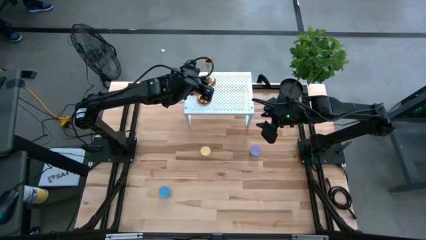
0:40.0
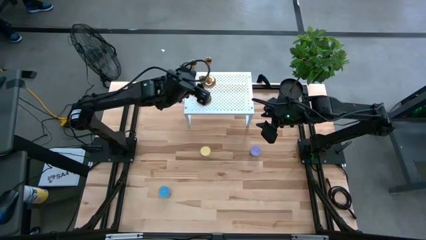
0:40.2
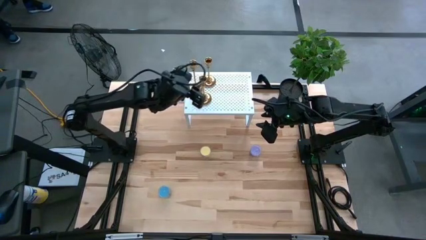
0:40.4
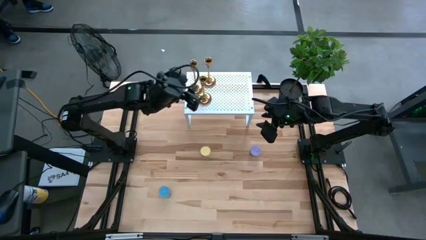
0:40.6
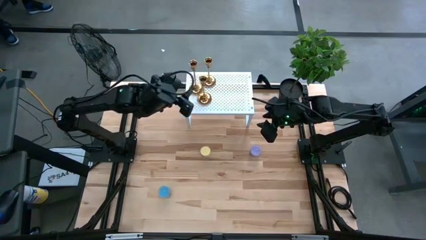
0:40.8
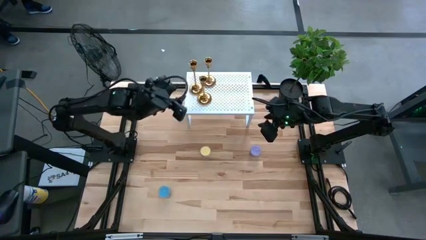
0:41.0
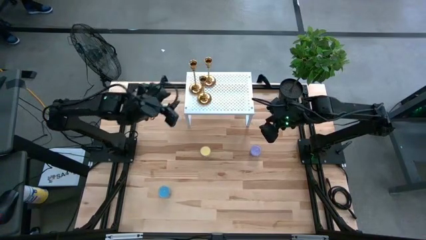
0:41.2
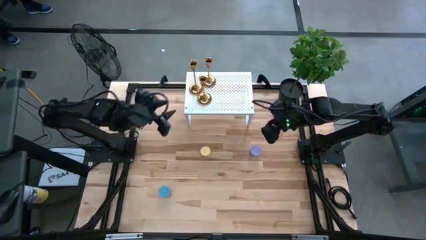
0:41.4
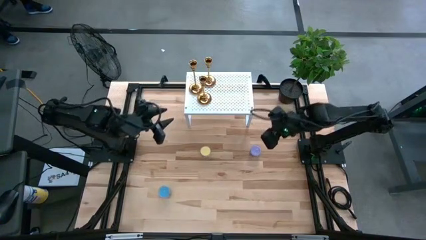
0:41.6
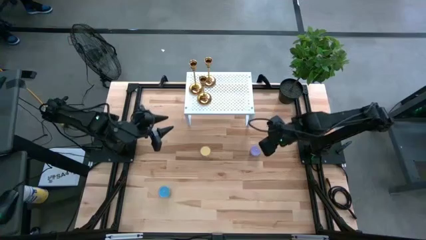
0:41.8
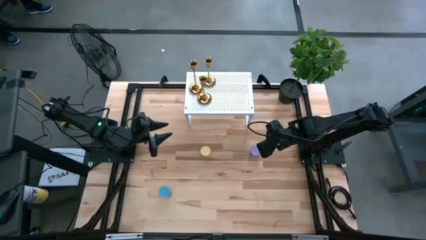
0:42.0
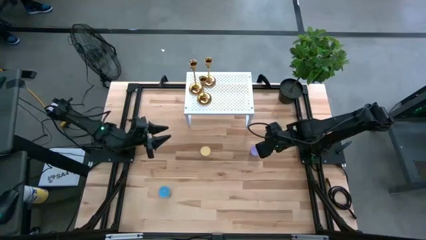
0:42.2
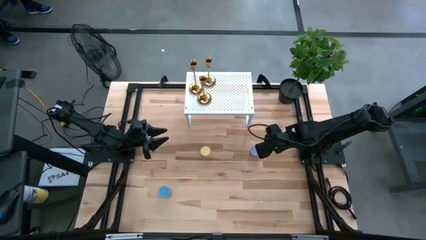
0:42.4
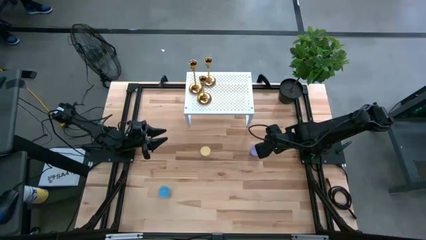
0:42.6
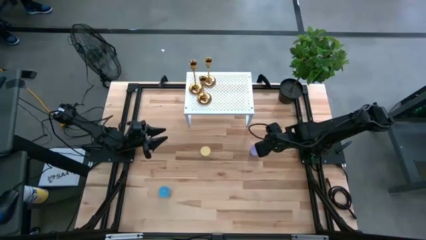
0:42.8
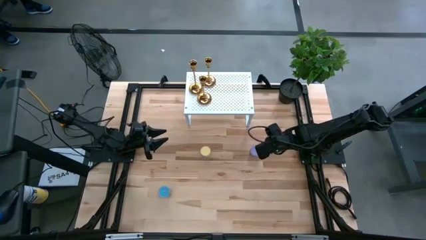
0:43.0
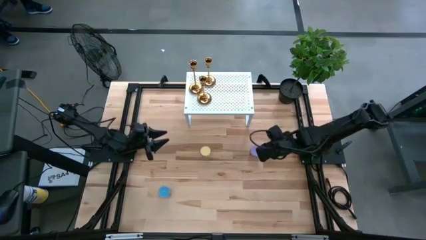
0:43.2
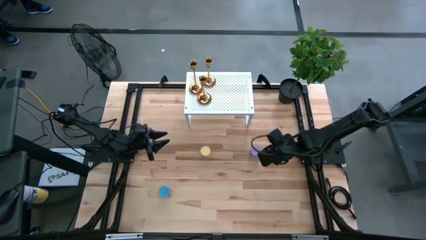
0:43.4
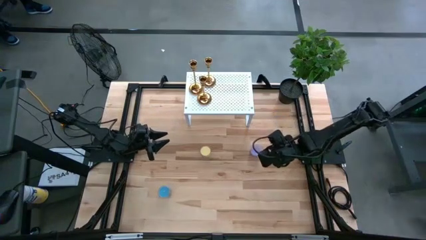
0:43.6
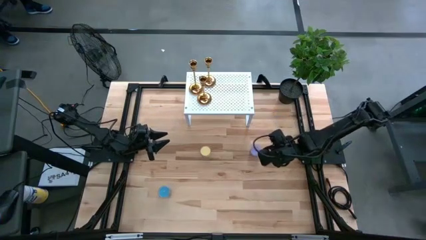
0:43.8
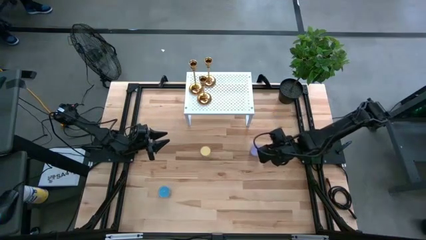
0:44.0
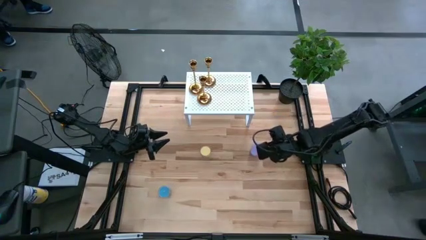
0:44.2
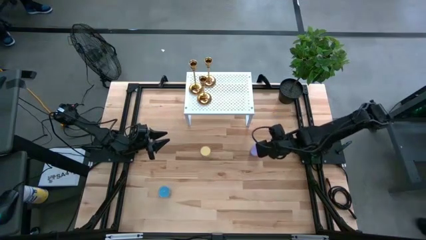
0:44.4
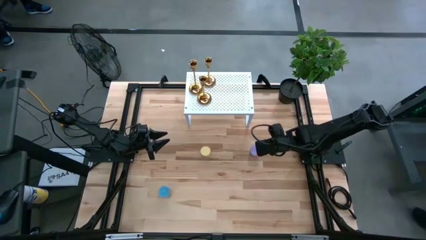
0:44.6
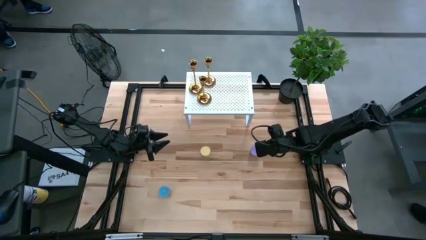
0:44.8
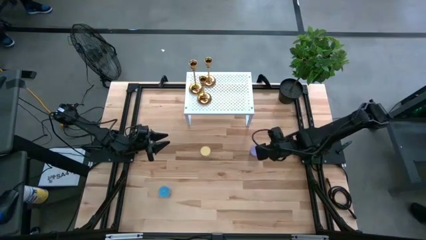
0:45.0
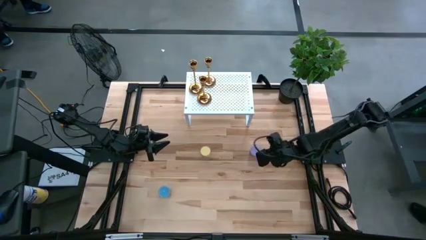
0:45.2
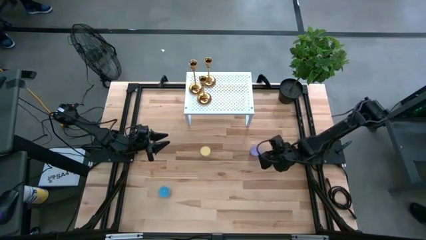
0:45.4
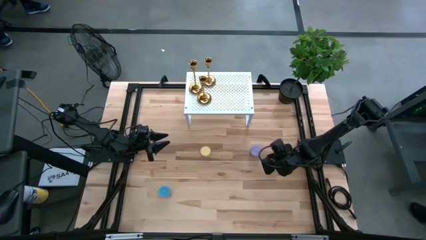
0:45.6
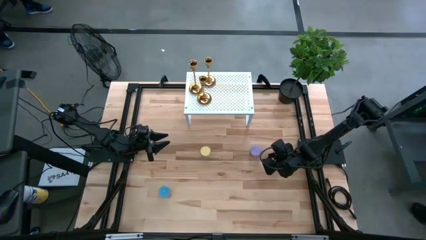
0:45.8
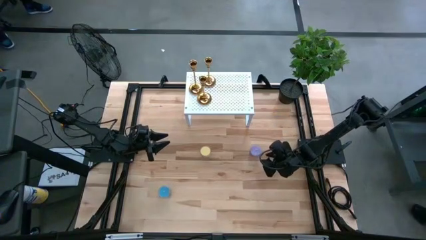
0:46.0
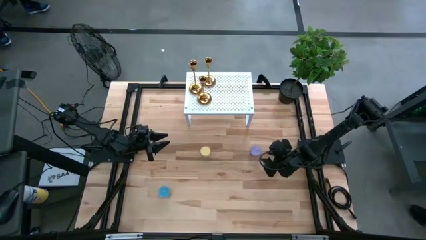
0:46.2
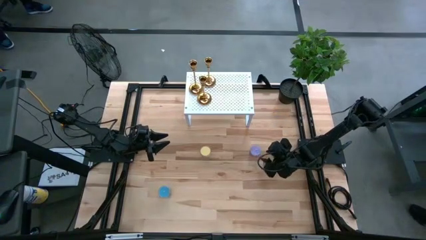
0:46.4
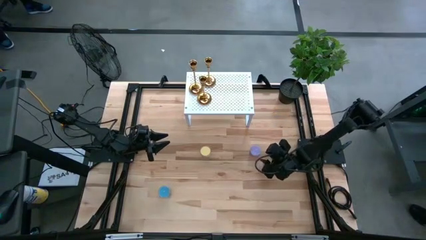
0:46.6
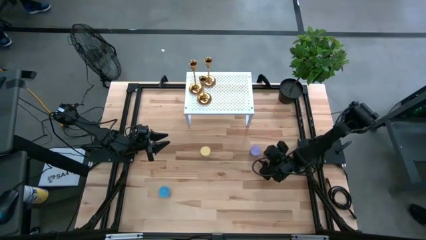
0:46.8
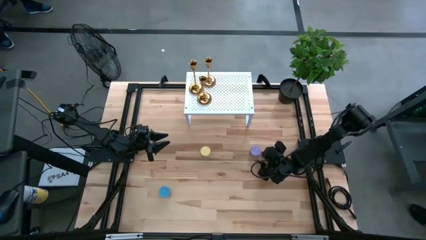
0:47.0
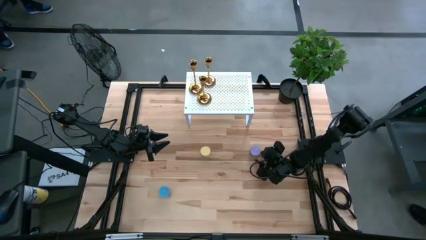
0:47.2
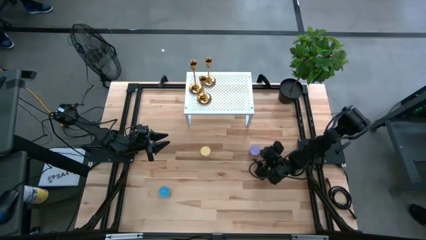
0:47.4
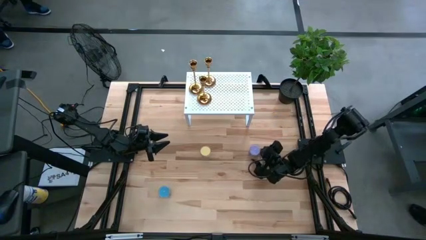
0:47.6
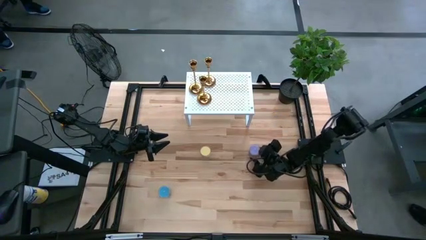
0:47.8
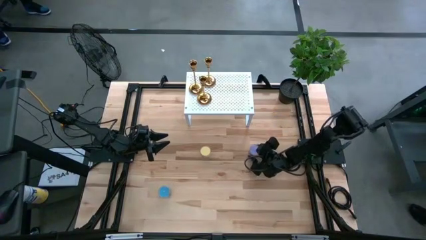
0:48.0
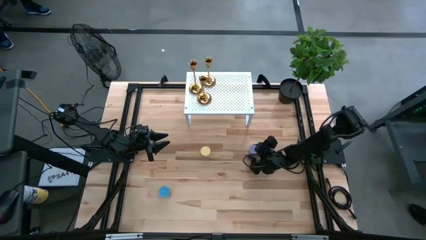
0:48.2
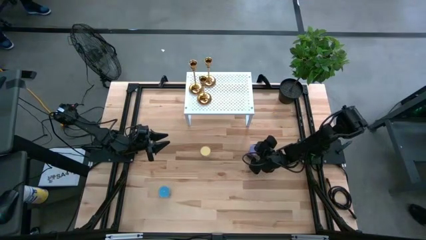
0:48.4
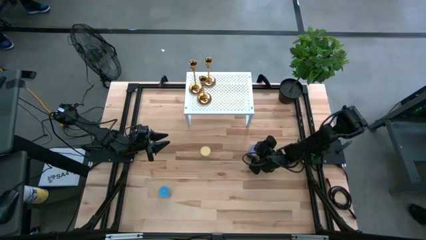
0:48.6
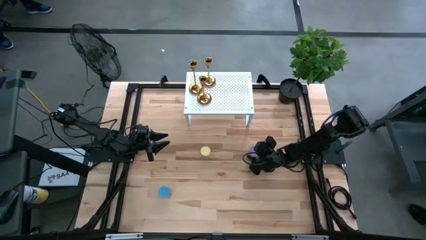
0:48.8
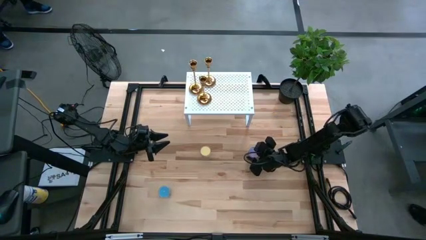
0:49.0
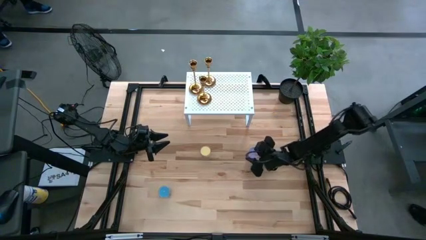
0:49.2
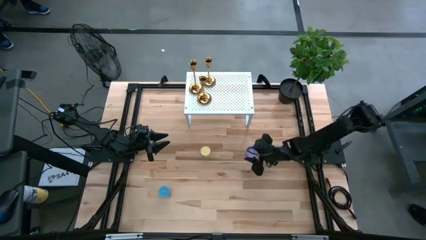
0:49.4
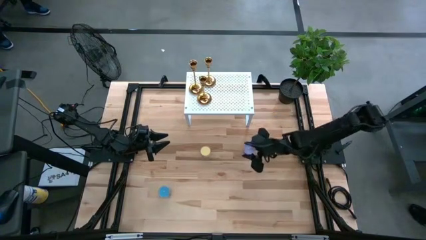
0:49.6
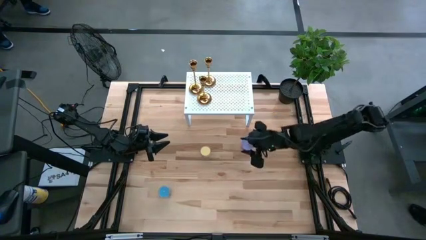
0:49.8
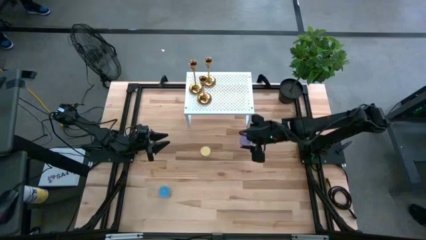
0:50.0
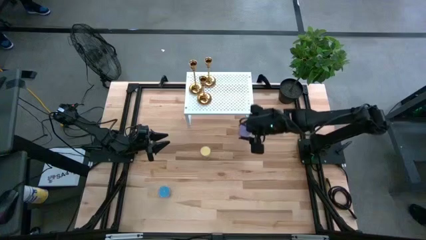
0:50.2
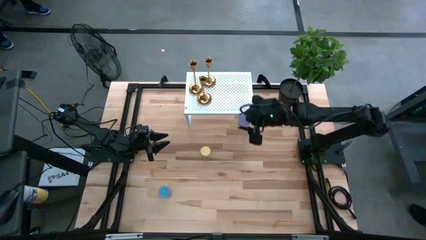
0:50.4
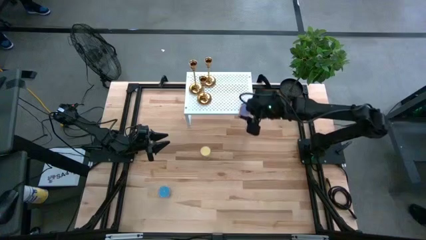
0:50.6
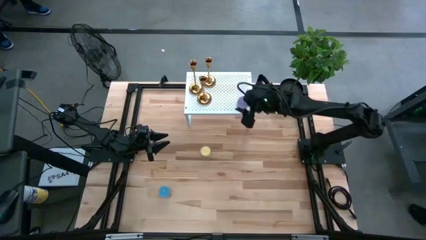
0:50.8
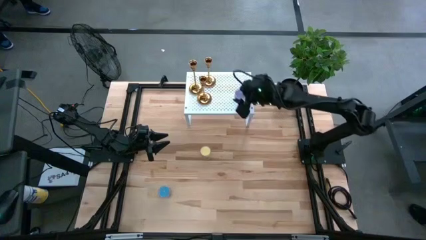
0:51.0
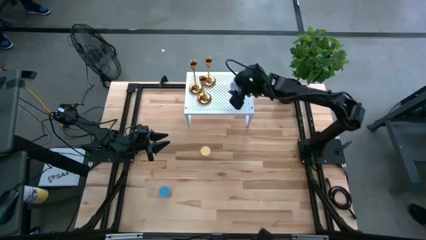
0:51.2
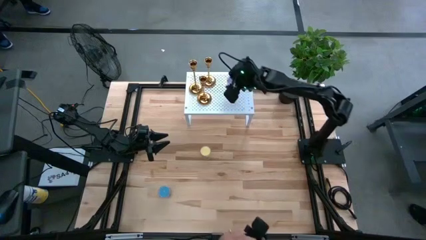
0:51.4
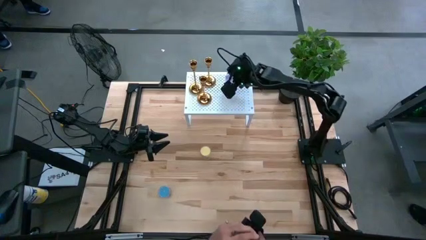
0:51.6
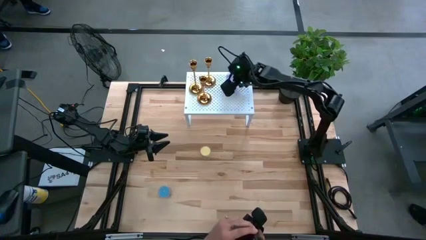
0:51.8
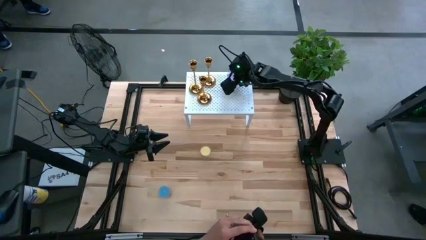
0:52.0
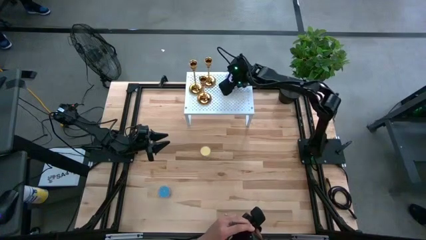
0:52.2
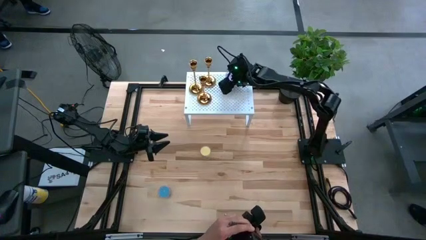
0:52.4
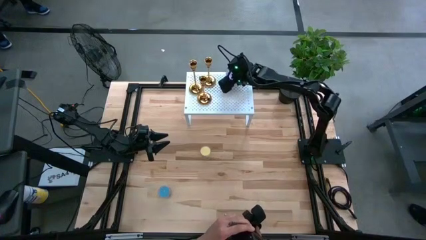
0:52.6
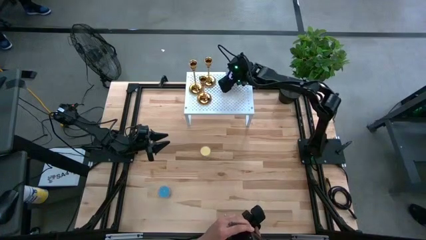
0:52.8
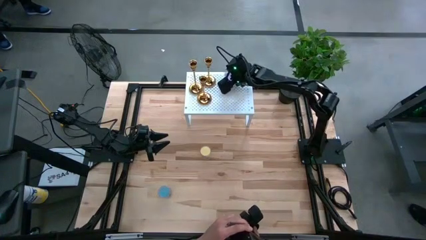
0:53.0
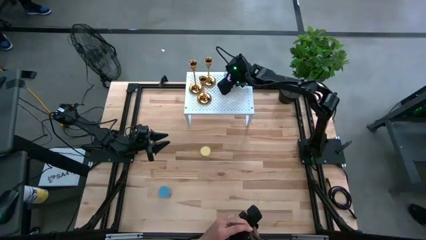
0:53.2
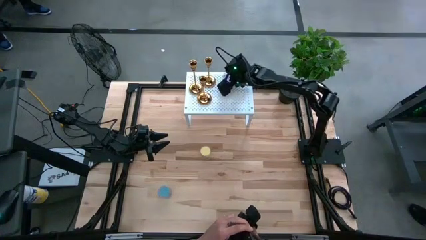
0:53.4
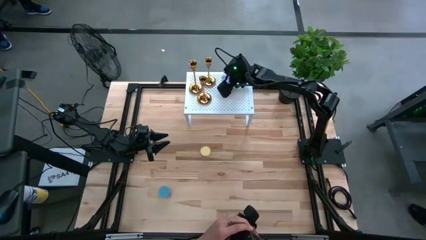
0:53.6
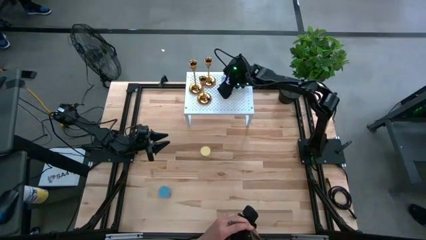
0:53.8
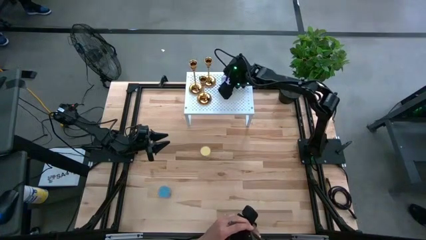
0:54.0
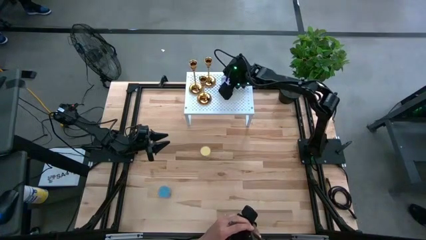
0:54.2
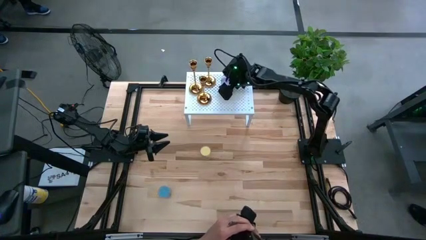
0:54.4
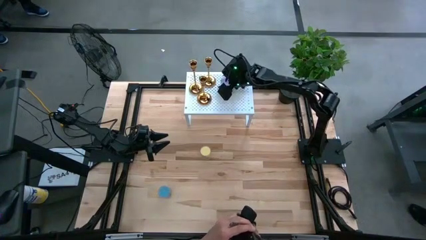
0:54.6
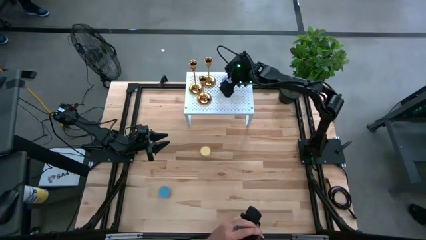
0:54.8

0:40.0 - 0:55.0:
Task: Pick & Place candle stick holders
Put the purple scented candle on the shelf

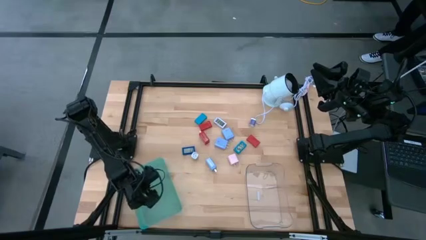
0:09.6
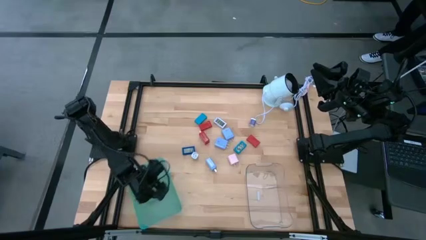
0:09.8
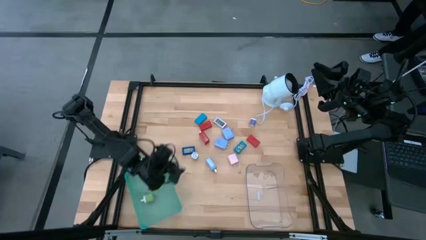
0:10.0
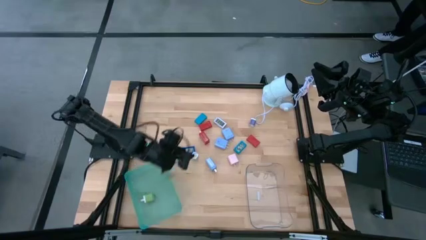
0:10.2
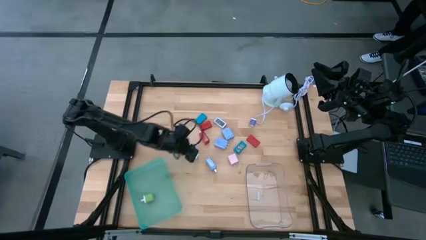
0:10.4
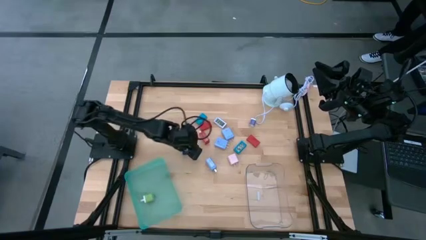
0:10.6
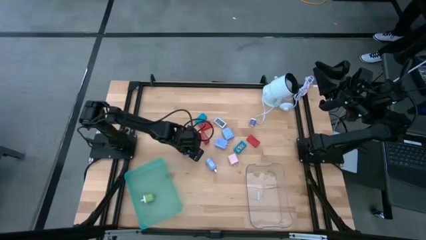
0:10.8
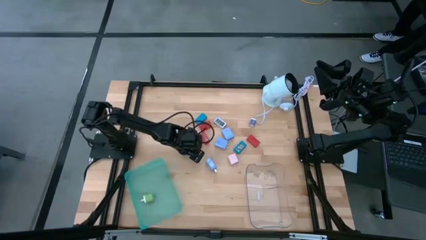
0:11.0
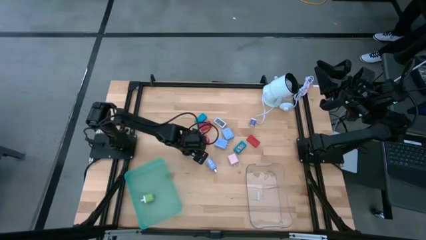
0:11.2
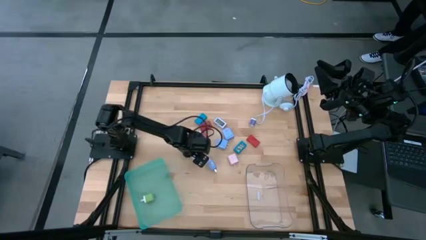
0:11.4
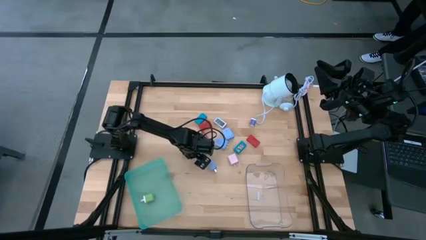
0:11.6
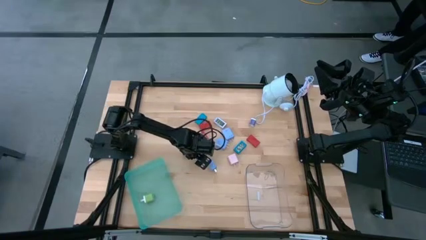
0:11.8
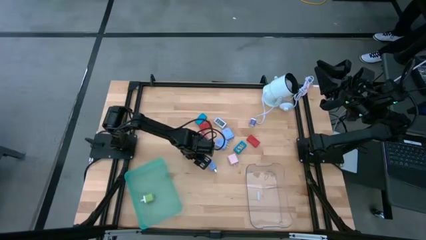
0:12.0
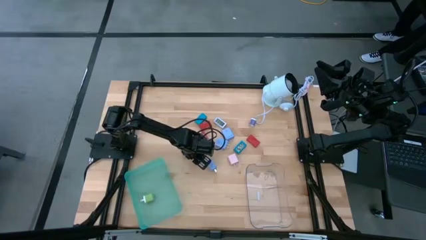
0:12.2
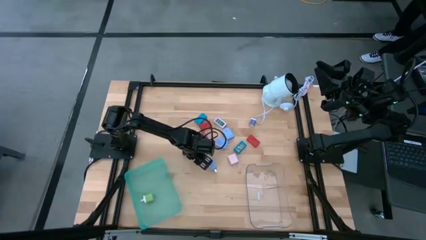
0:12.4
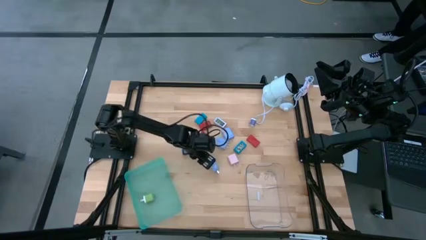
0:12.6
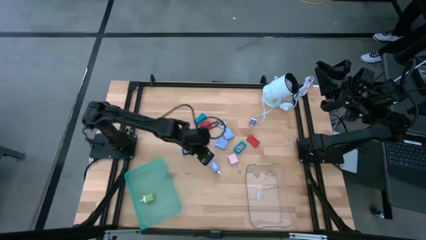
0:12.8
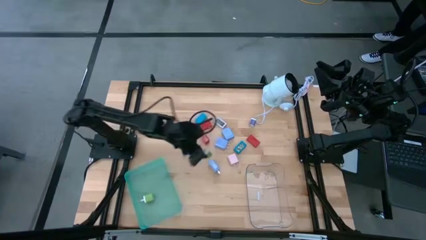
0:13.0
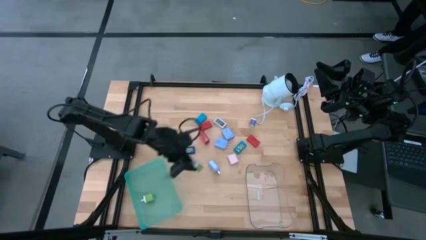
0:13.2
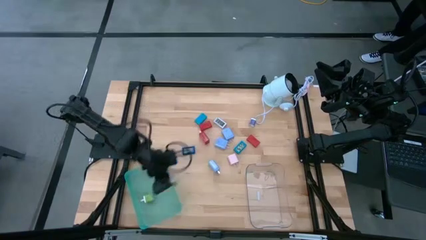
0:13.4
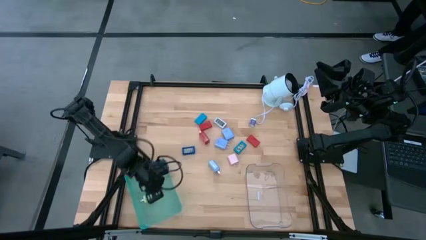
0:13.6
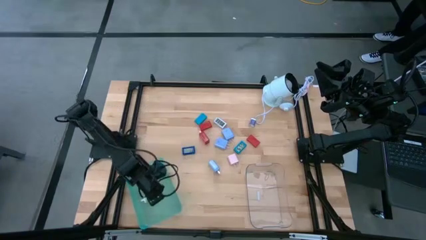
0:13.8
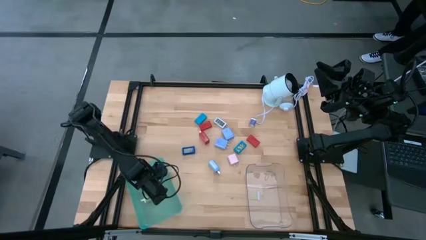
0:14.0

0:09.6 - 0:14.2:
Task: Pick & Place Office items
Put the green charger adapter into the blue bin
